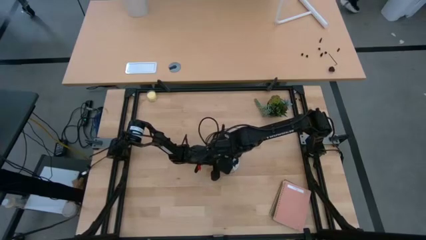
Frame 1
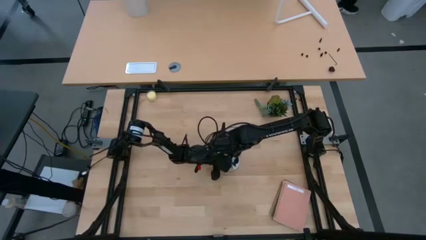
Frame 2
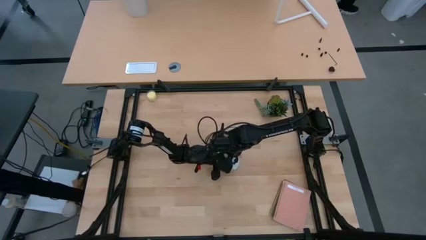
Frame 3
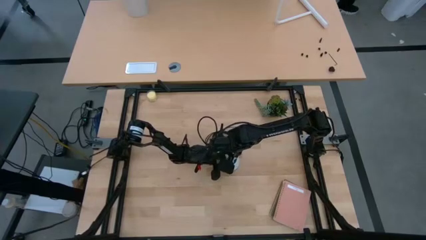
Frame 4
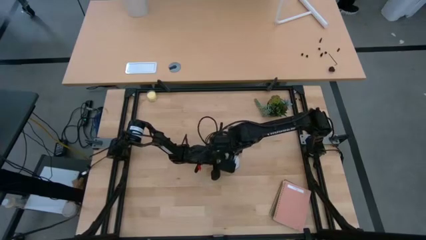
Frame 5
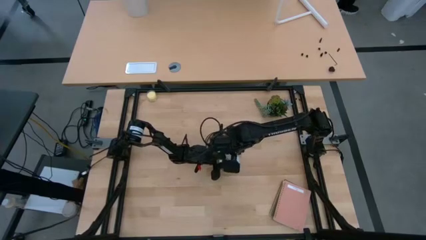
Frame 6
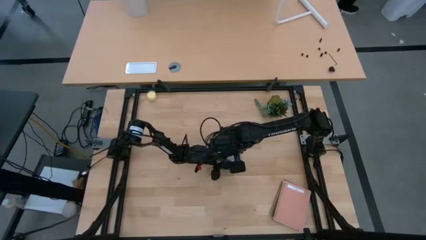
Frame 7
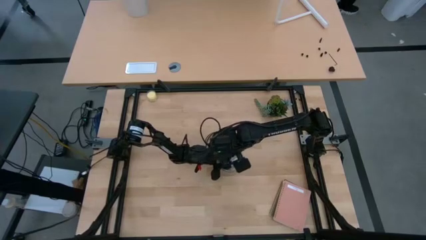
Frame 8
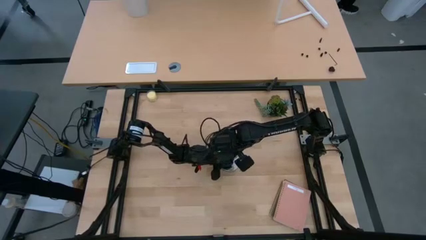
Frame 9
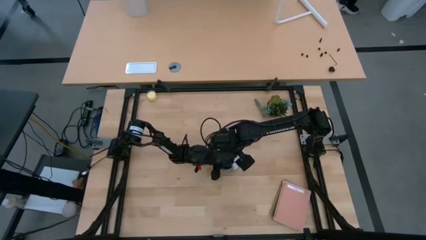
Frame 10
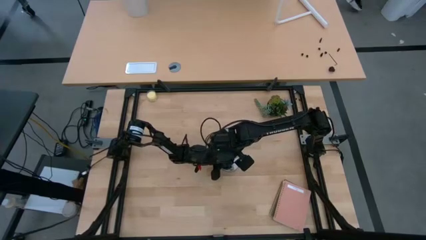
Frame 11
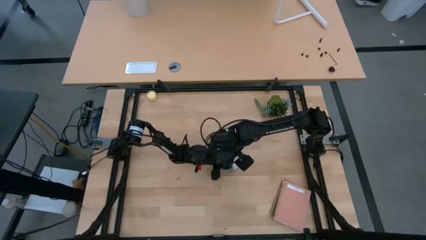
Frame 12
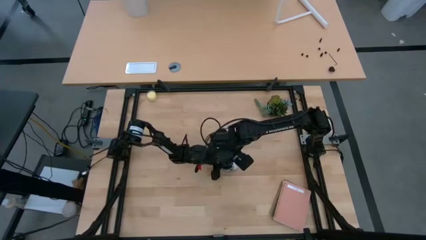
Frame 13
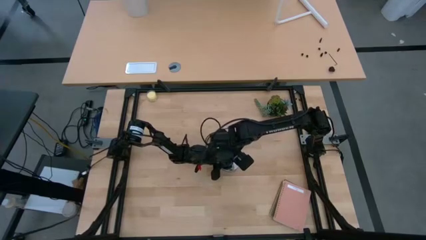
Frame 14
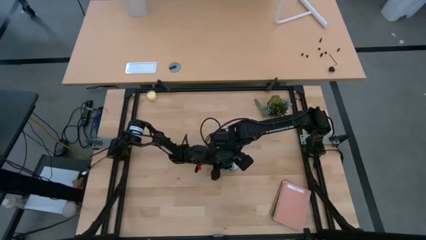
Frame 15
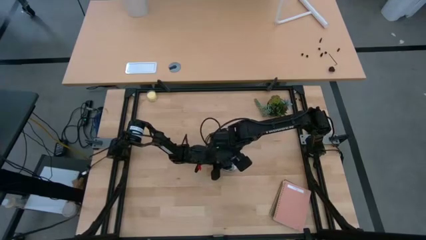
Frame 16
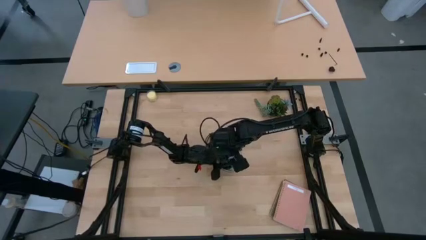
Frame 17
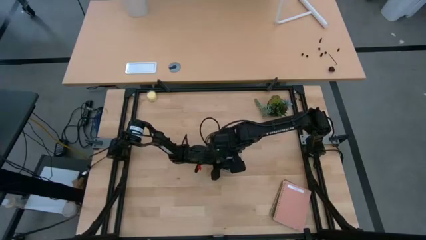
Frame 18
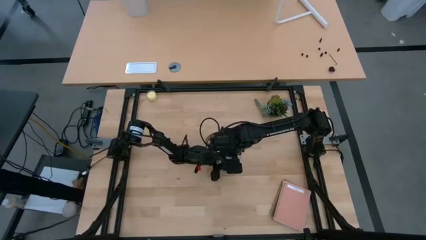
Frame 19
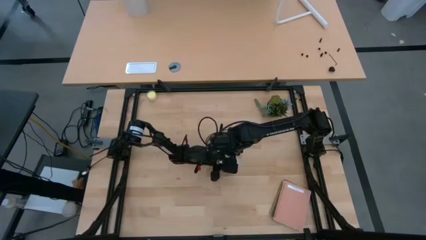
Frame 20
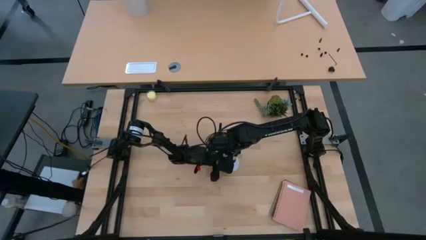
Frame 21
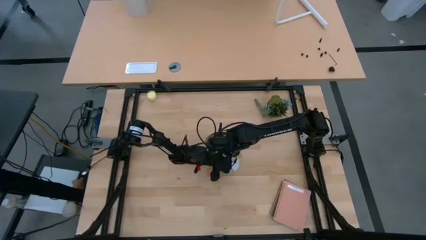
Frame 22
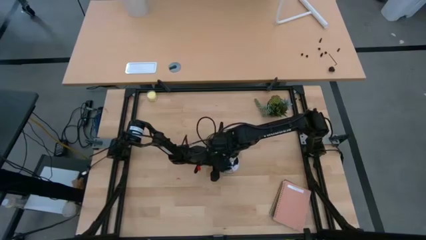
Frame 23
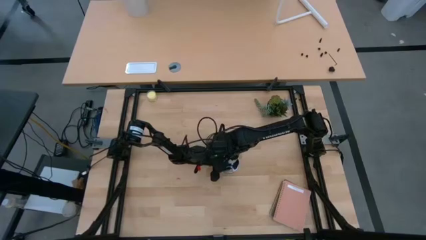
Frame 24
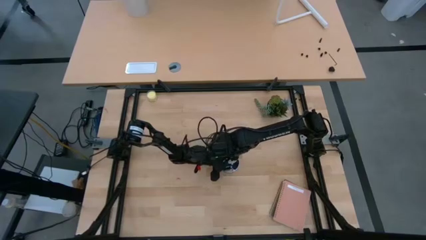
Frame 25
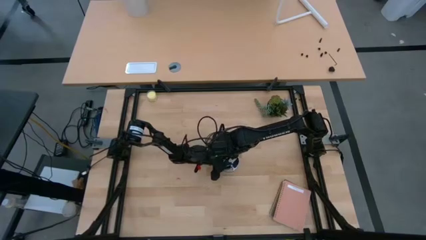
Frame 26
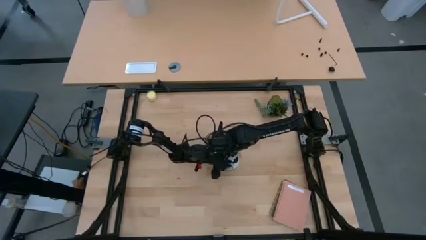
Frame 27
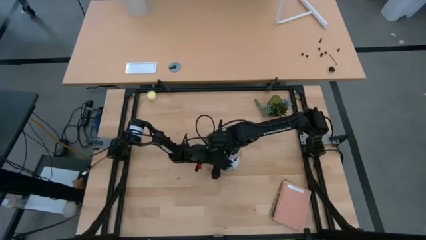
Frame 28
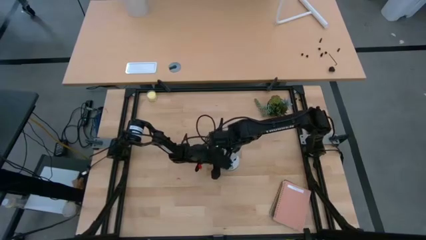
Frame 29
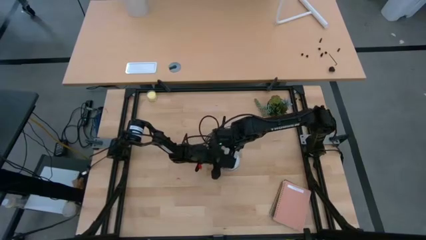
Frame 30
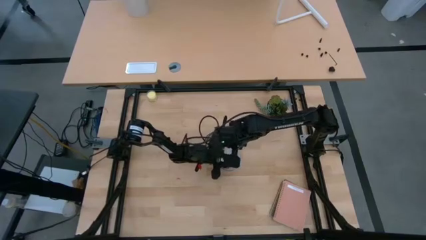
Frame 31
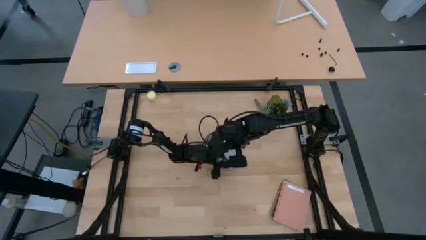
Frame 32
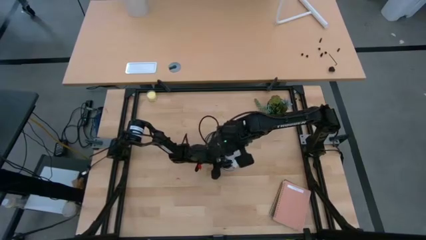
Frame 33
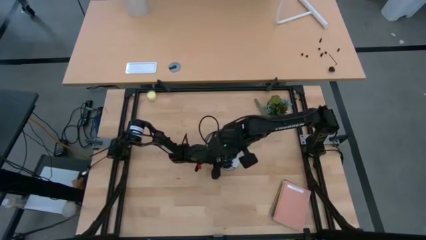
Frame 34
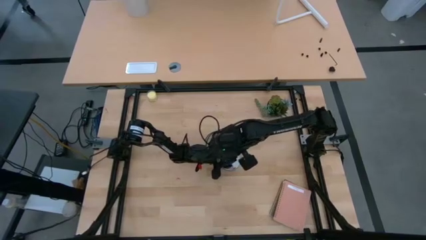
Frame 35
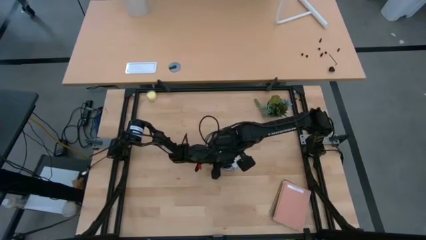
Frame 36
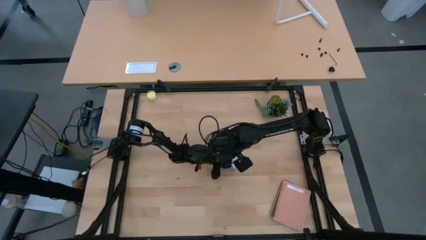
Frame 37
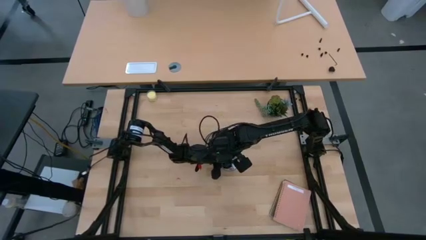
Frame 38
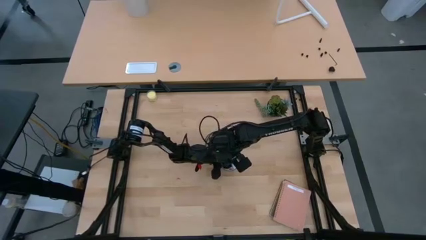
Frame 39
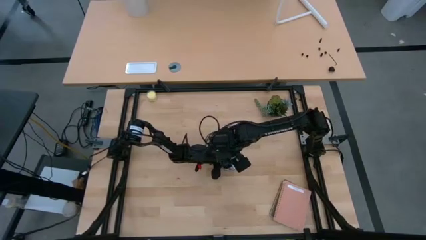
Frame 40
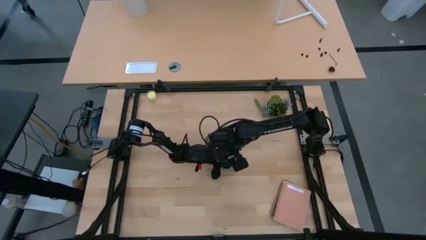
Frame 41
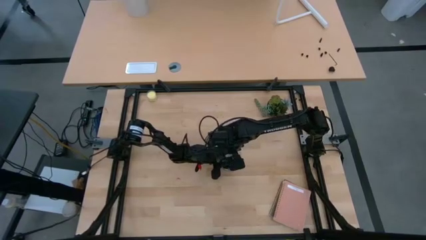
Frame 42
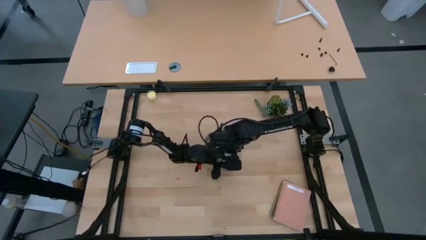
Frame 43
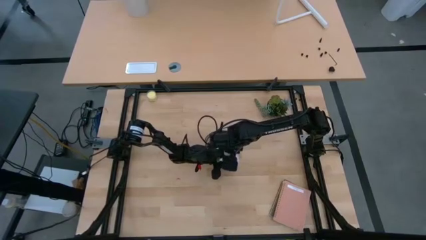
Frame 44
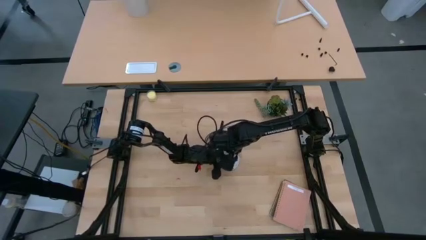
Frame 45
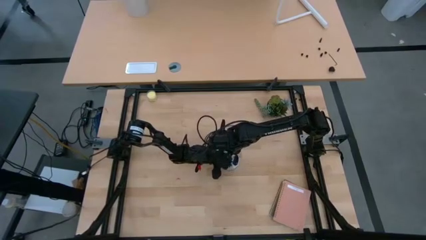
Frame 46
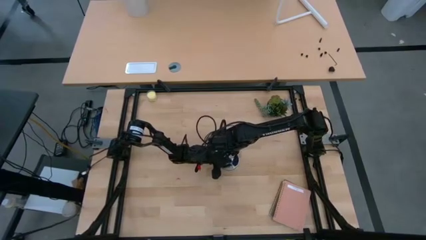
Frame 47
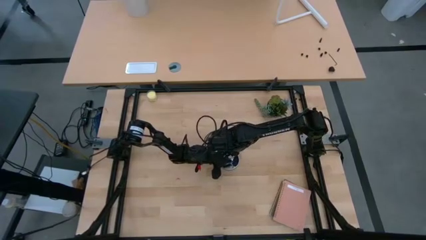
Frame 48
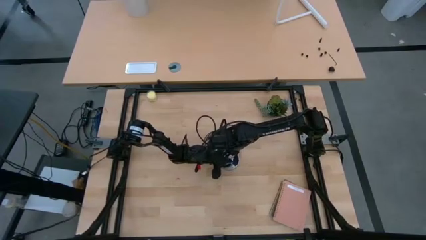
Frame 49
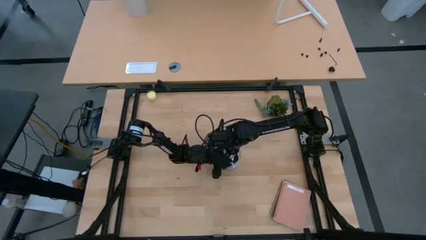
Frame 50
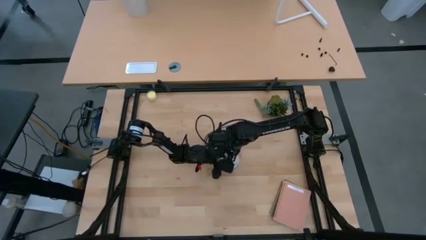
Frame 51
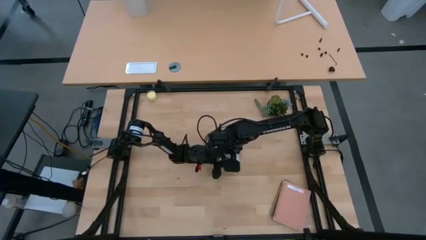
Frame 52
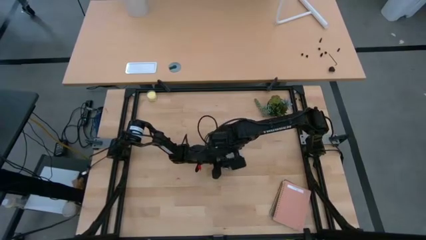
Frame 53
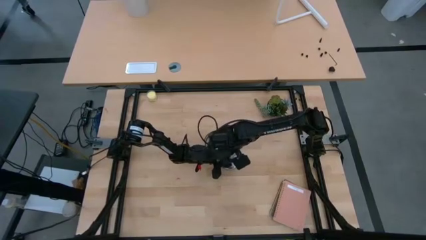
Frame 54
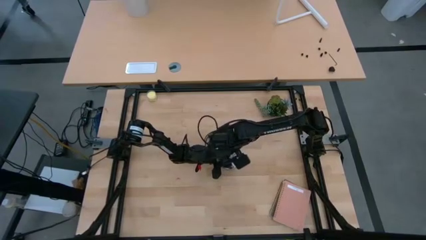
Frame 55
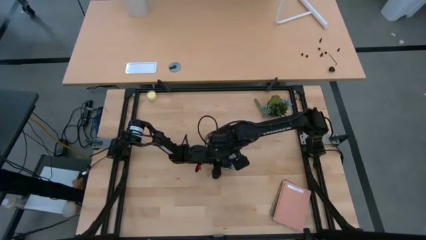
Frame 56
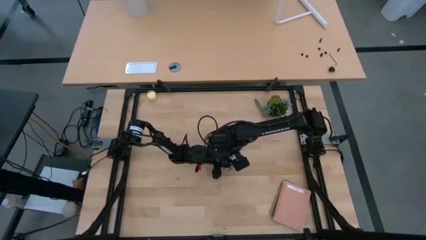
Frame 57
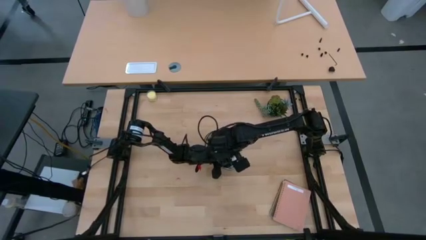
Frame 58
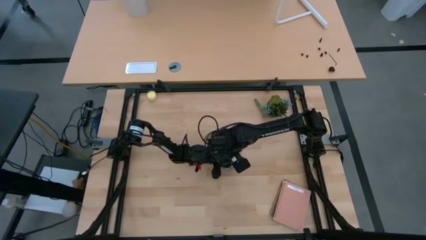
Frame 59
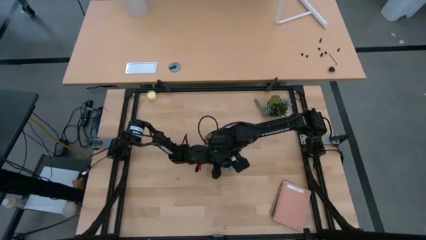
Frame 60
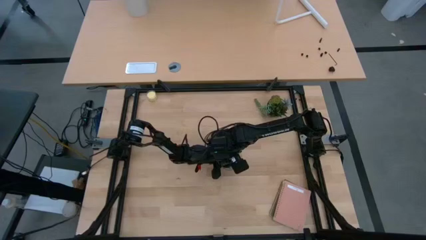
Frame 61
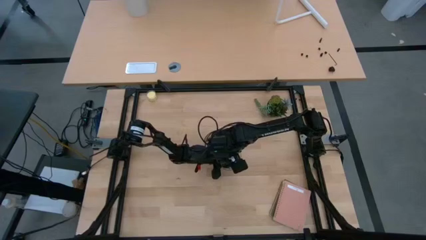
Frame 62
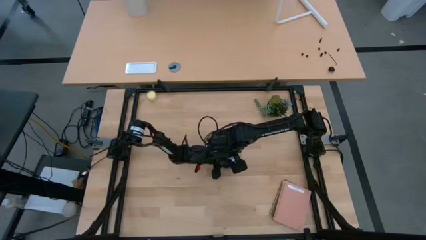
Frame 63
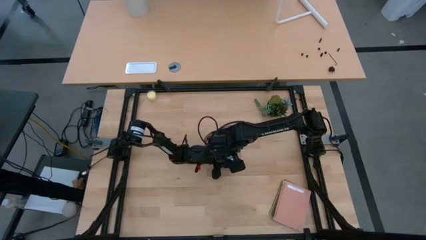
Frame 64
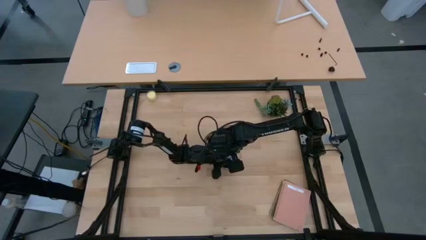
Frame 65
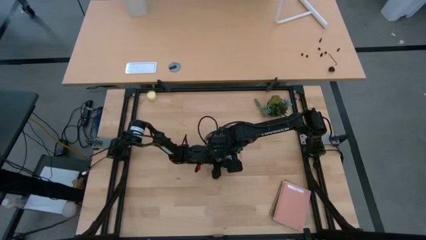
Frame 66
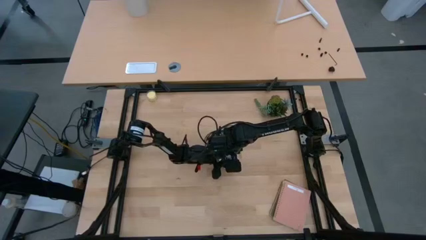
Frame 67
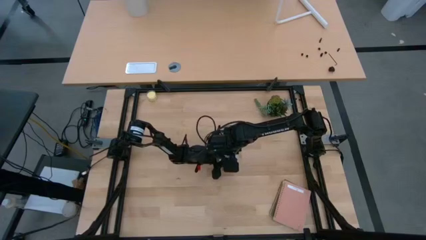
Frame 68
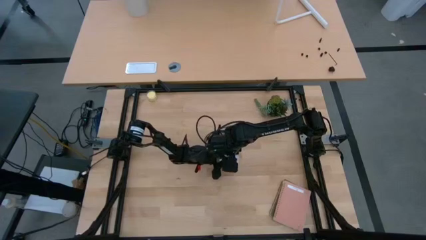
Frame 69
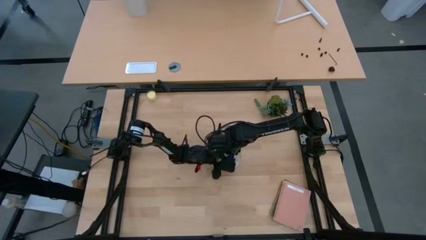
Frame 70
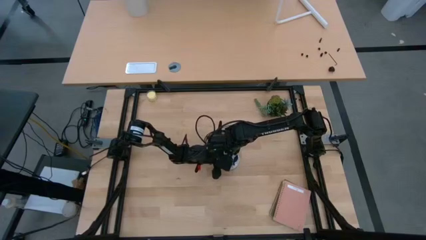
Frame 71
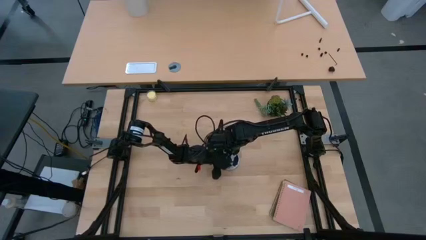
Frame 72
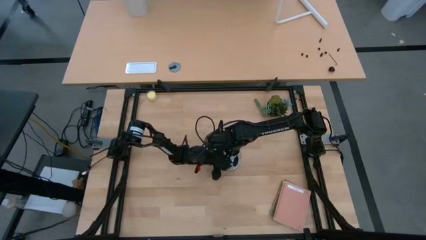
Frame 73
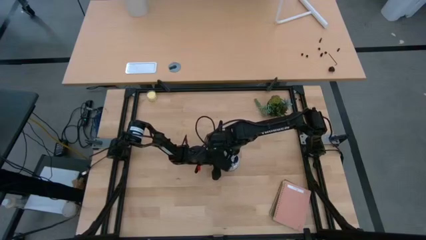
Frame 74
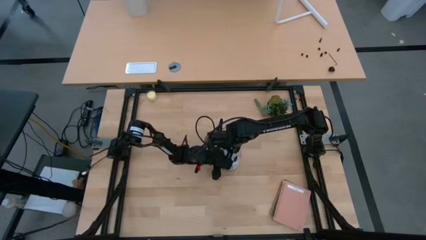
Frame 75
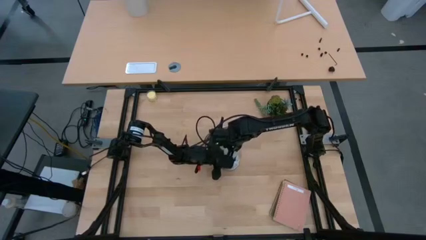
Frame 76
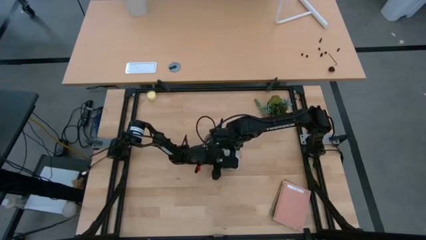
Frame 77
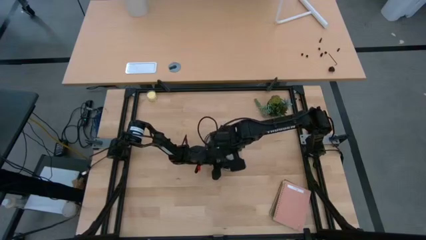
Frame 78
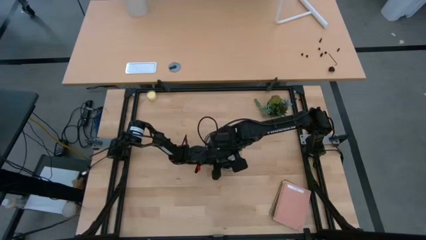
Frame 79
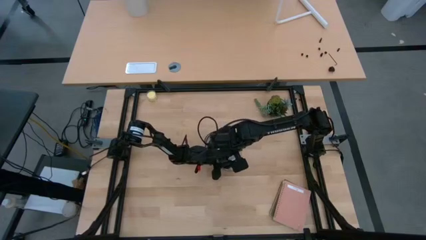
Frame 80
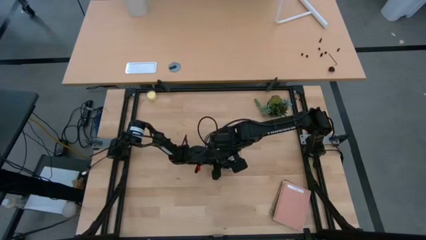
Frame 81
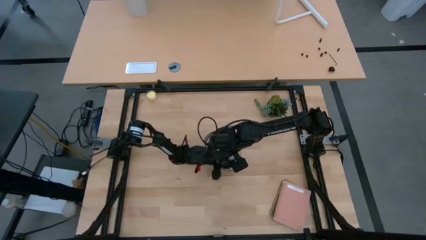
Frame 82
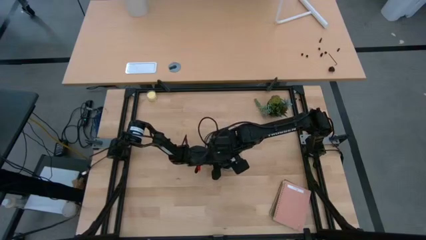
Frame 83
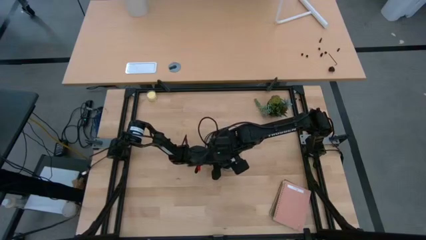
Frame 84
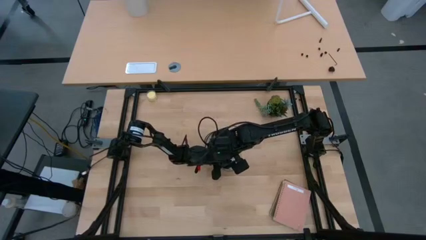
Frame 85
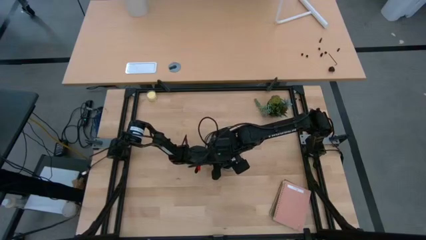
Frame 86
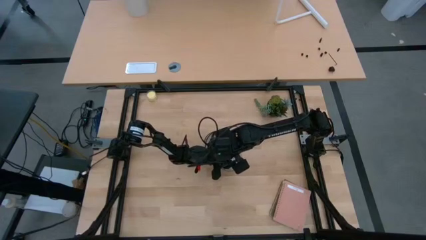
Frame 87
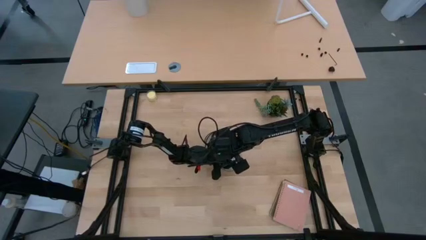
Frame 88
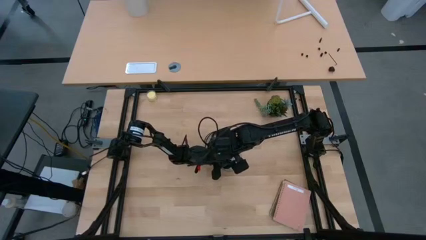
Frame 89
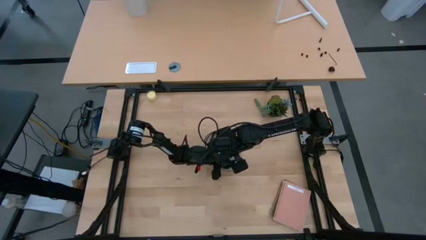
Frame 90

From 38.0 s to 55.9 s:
Task: Screw lightbulb
Insert the white lightbulb into the lamp
